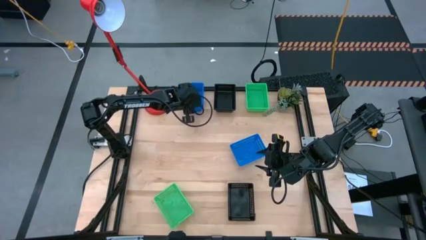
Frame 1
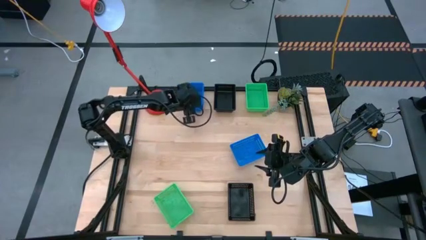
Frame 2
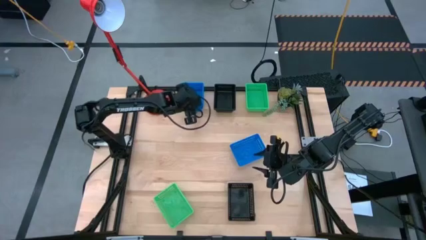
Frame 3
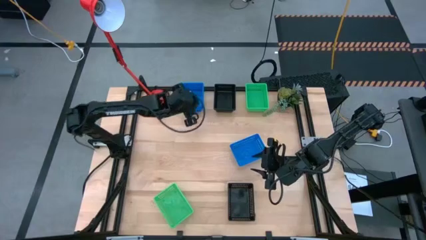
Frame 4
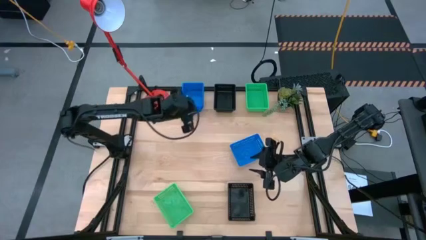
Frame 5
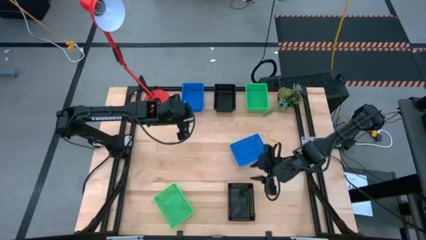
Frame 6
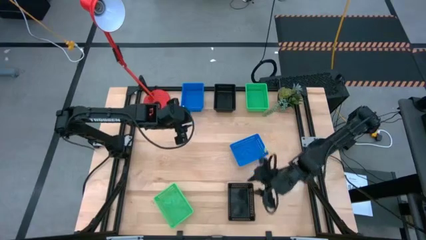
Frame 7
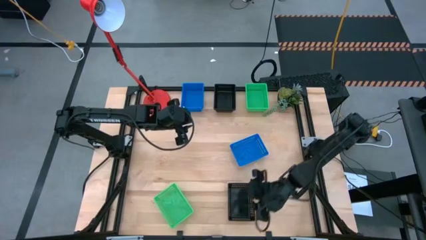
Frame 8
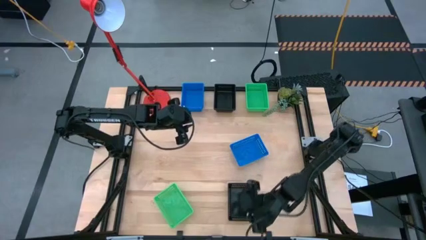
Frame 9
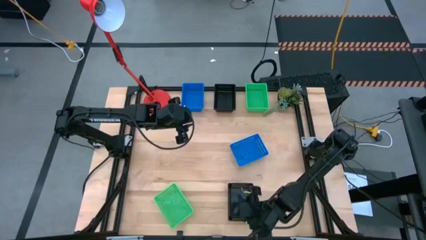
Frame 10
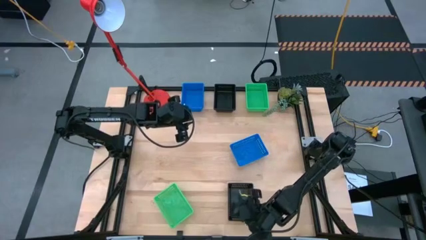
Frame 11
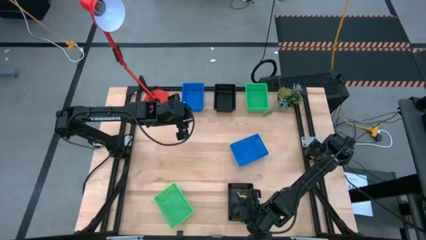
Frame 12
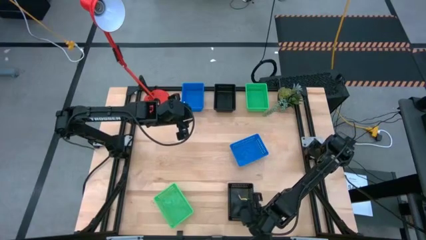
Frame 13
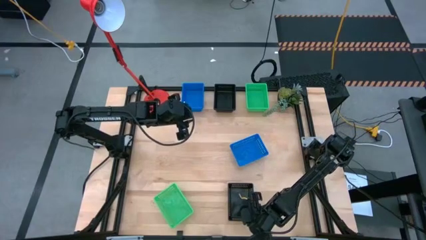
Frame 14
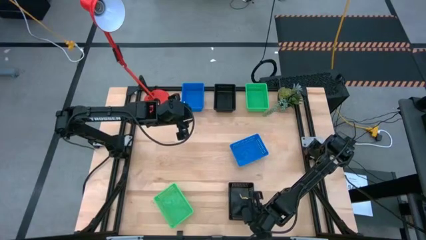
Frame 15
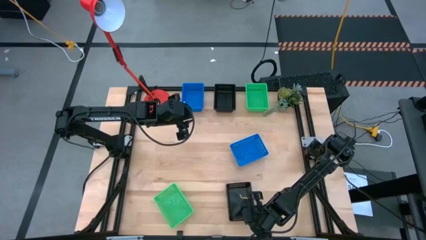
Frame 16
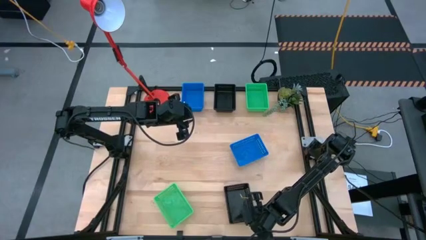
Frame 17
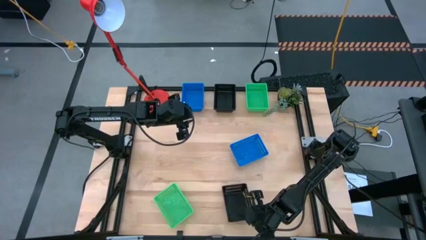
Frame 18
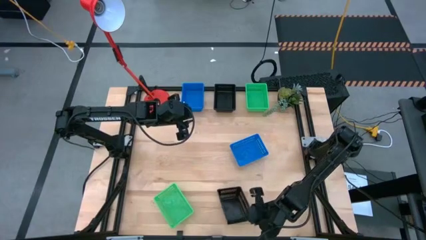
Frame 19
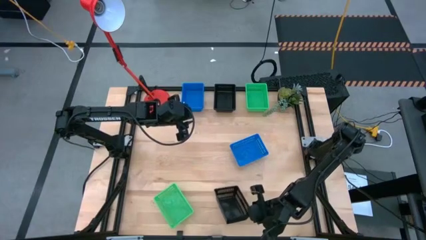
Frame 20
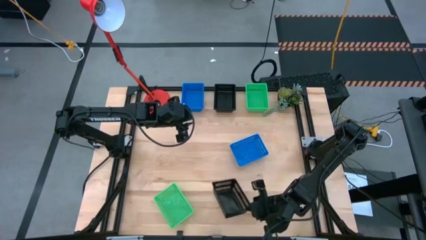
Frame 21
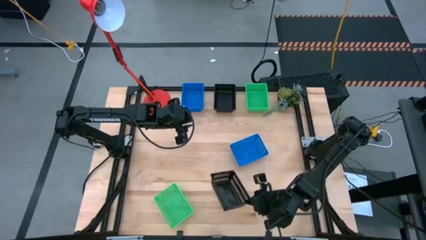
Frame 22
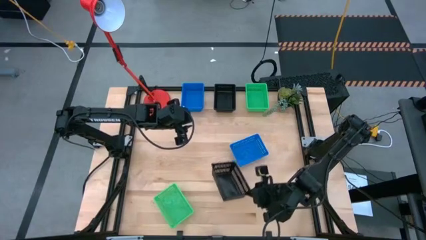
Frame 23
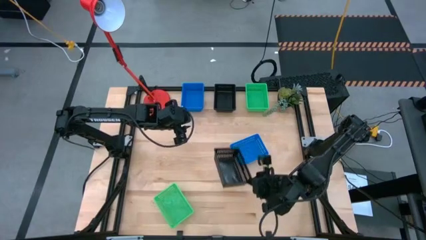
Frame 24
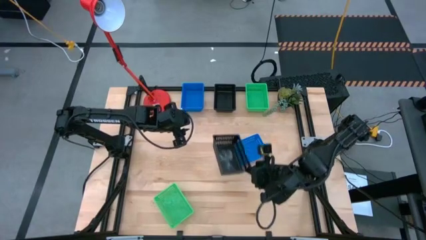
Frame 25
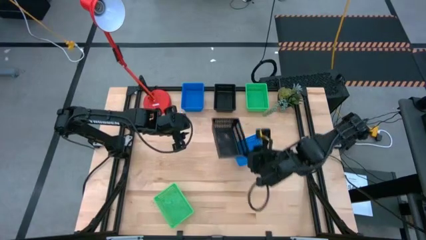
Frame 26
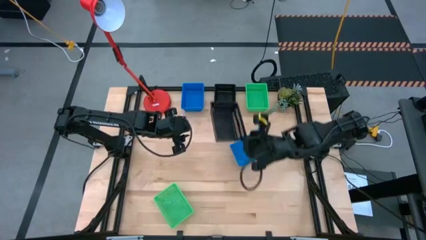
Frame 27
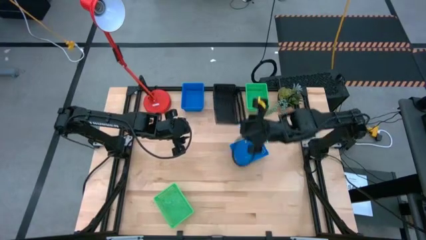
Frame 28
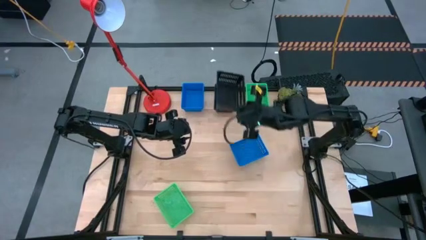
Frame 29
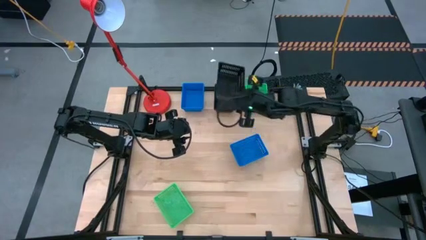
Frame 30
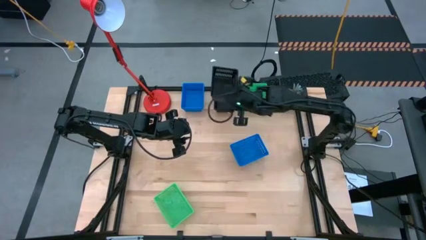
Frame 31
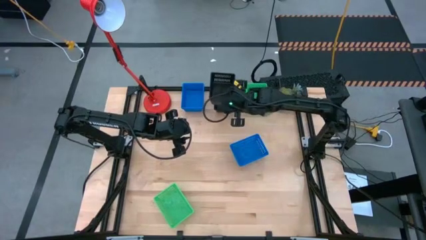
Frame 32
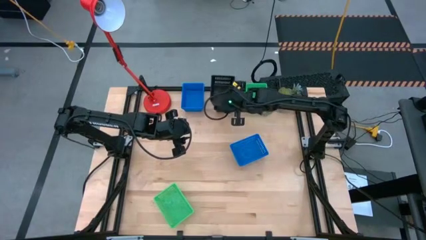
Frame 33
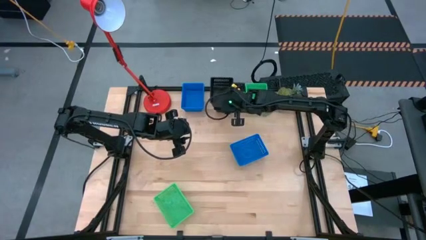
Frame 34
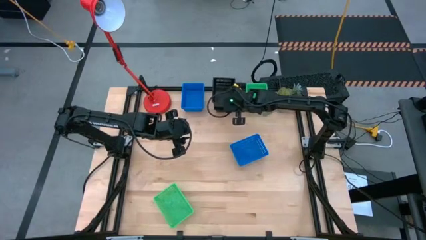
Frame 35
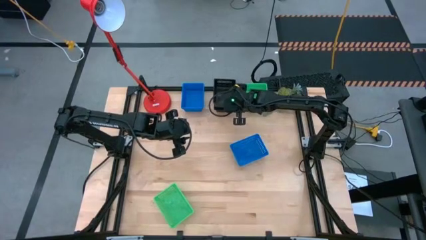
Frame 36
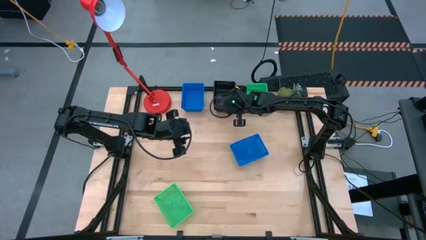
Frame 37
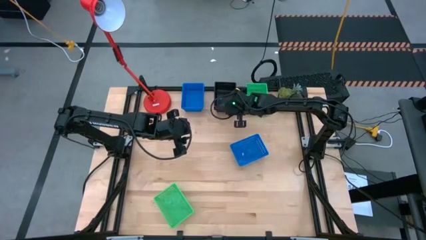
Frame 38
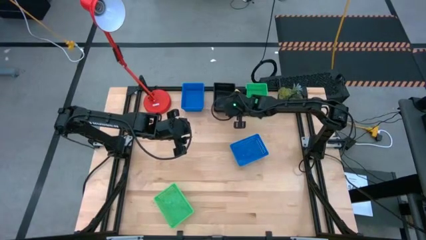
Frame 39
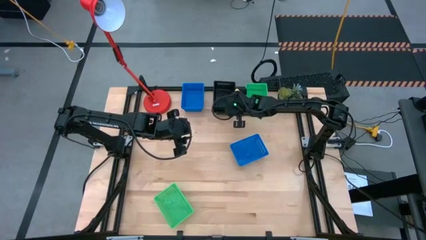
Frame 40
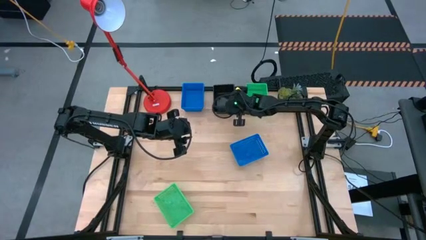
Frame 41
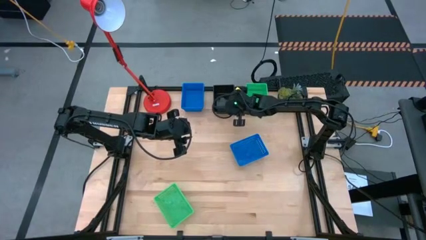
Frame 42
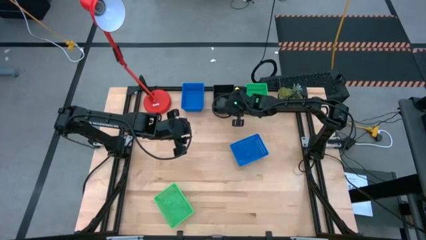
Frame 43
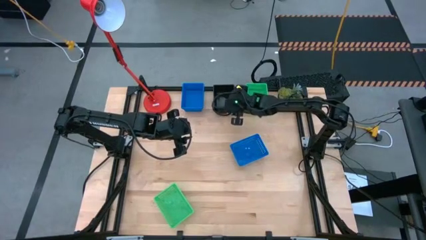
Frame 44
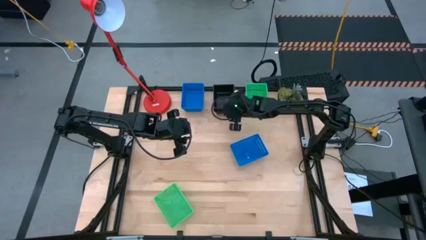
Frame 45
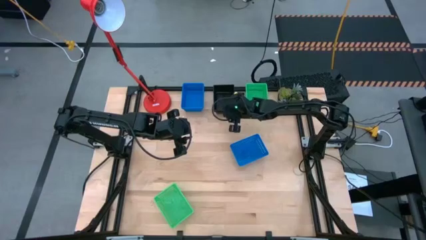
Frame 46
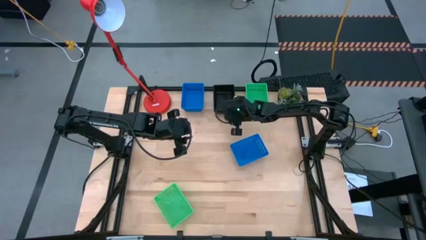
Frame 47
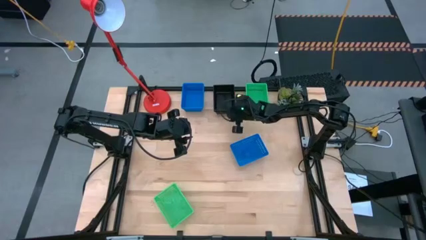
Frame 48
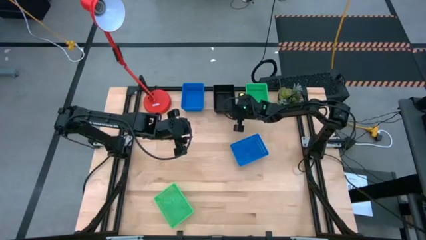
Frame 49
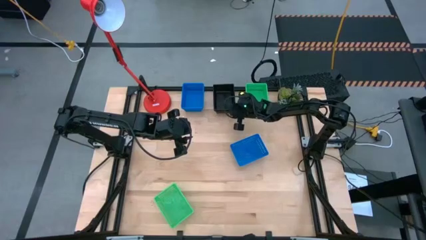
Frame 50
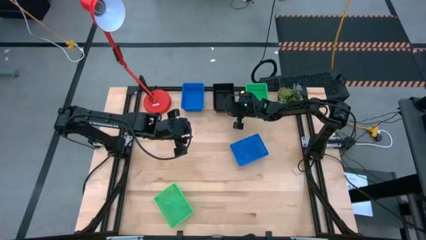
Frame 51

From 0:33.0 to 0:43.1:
Stack the bottom black basket on top of the black baskets

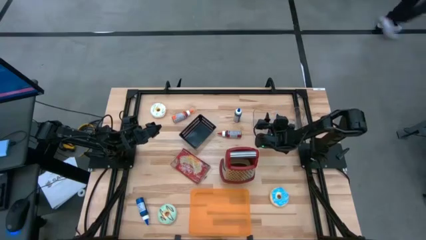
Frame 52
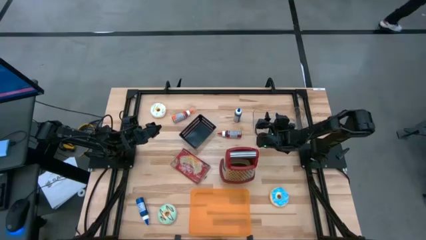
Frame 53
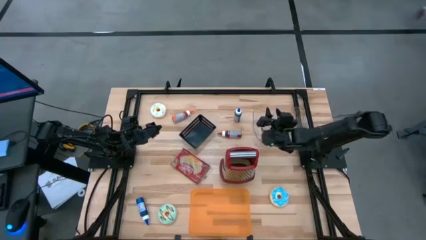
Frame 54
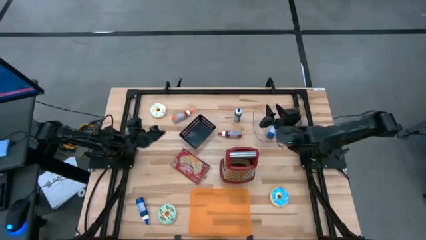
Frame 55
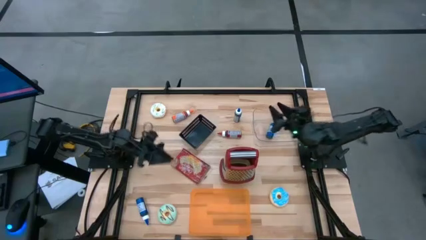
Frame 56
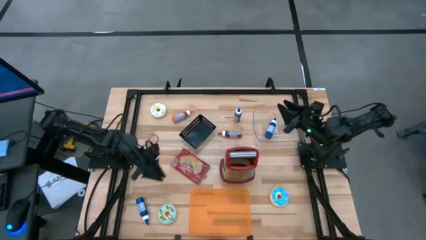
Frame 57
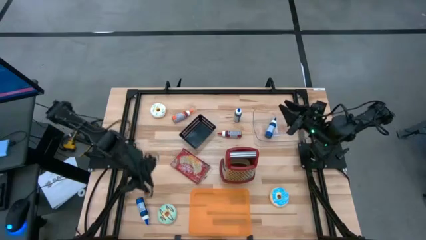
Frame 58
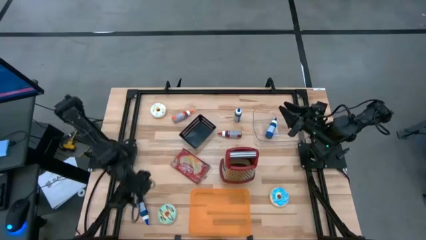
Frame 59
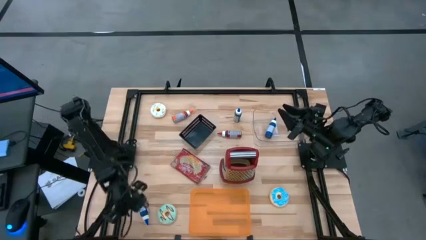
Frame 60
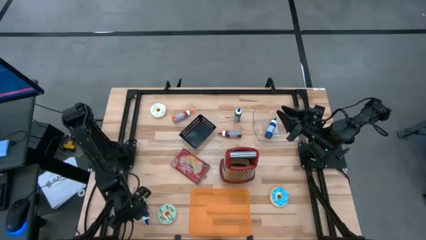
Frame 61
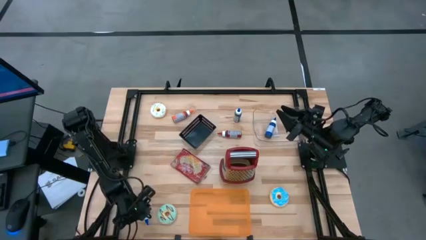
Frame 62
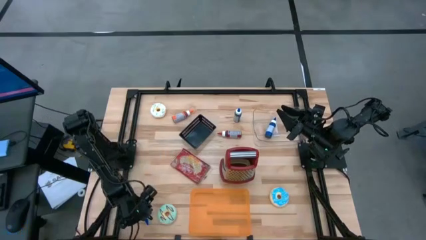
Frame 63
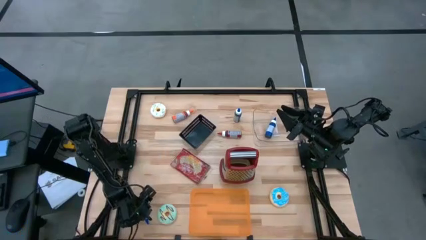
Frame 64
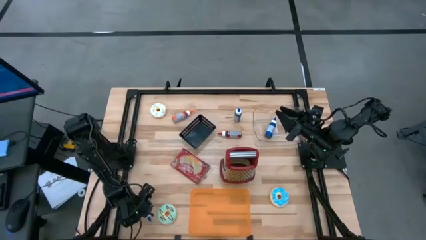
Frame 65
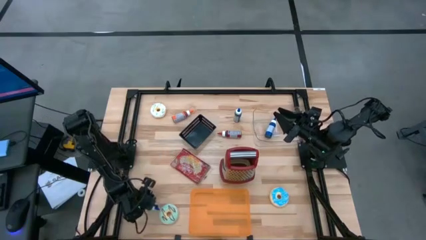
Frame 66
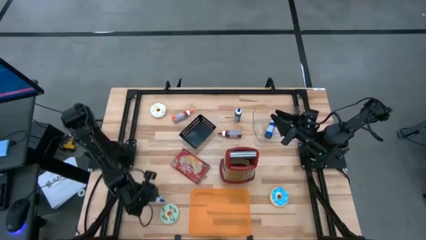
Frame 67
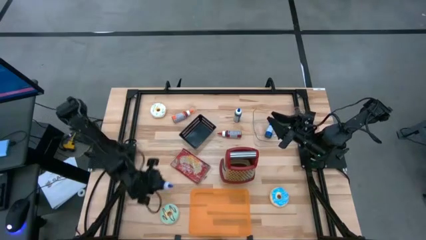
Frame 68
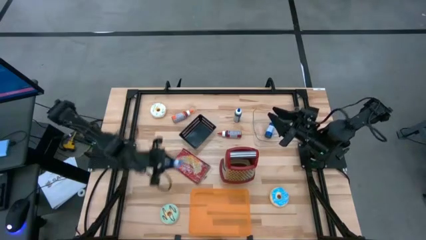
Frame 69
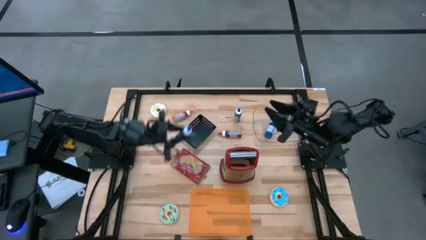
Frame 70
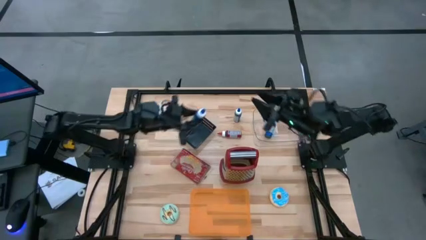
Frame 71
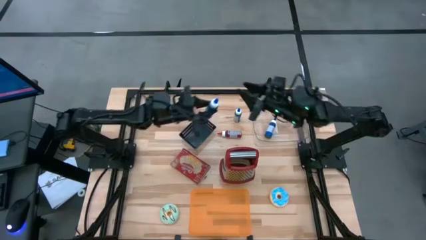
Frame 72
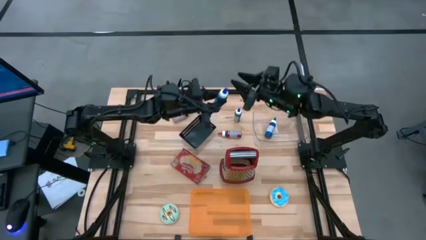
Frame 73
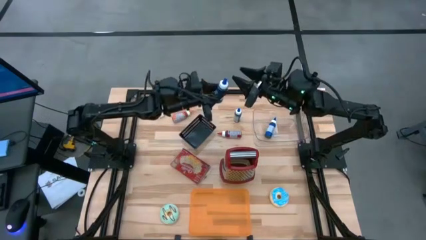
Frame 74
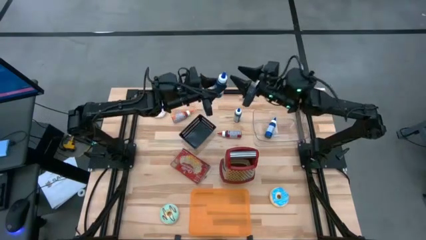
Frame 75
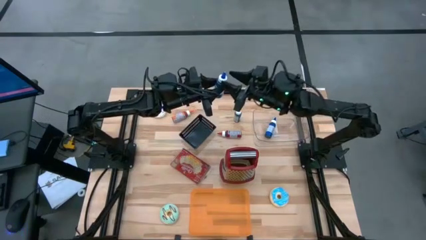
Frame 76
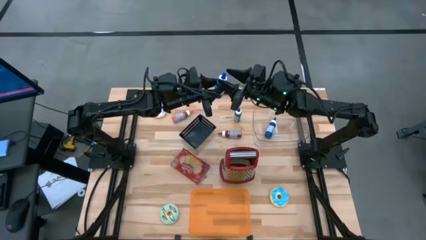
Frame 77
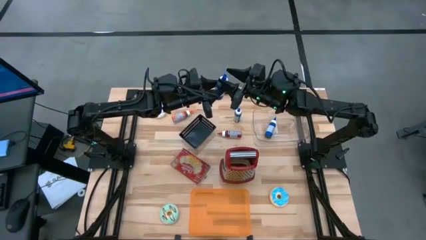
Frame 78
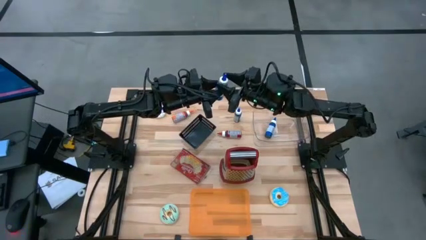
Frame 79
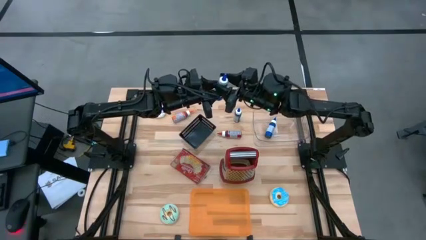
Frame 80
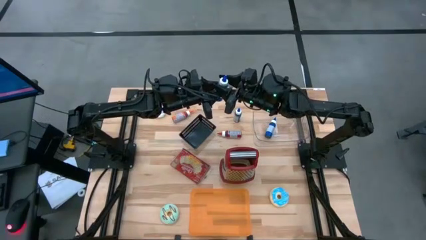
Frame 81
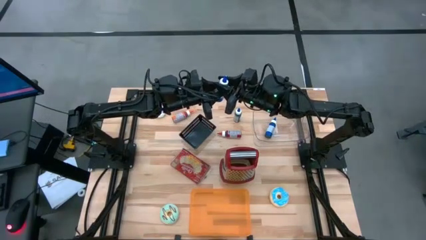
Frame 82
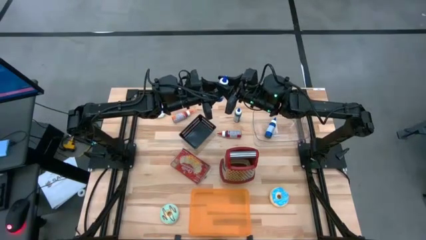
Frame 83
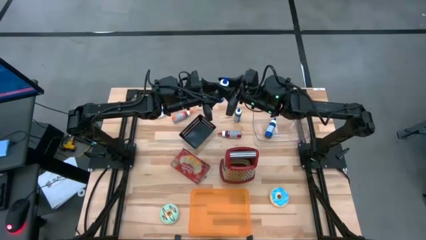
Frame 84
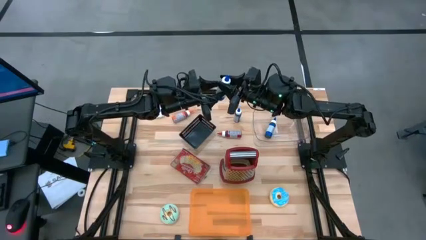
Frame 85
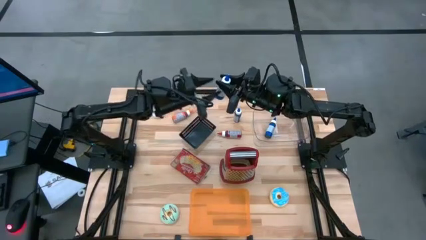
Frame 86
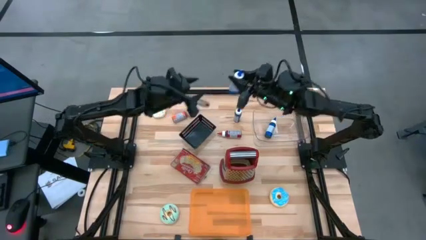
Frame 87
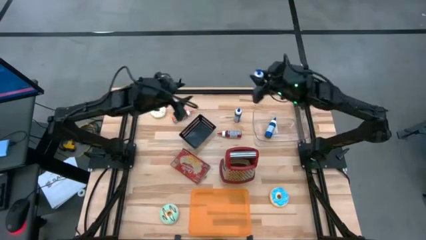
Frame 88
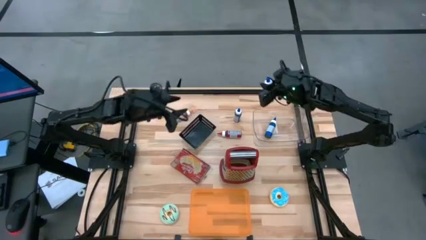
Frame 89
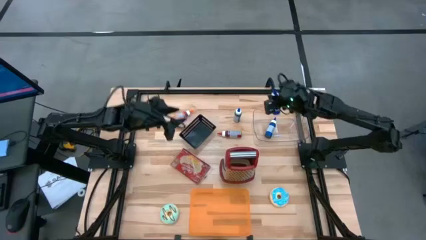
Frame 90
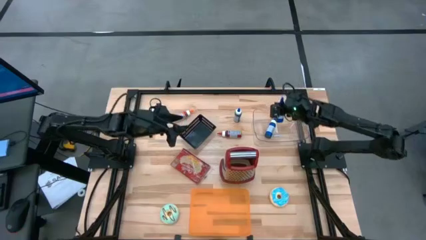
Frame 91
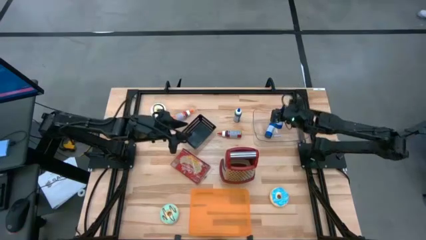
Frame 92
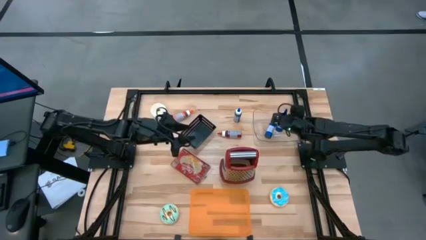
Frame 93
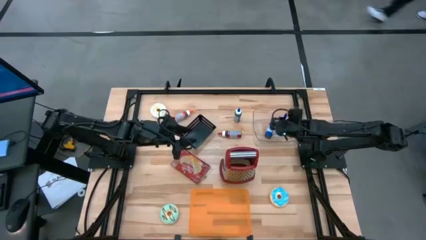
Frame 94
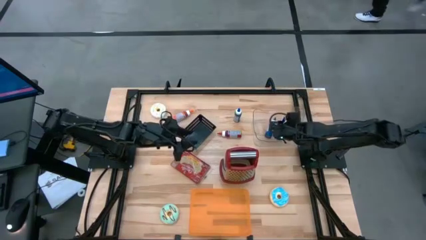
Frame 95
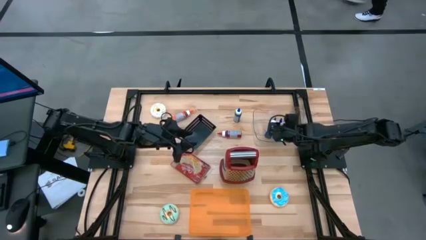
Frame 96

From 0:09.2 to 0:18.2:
Put the bottom blue food coloring bottle into the transparent bin
